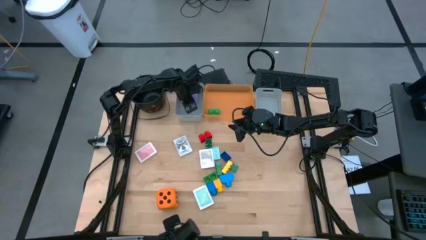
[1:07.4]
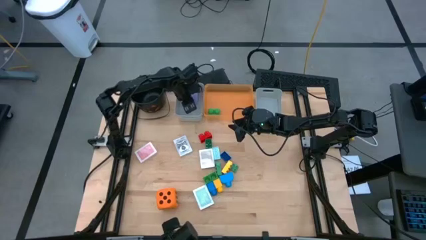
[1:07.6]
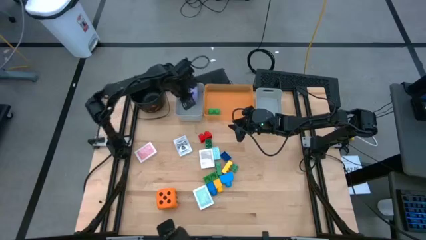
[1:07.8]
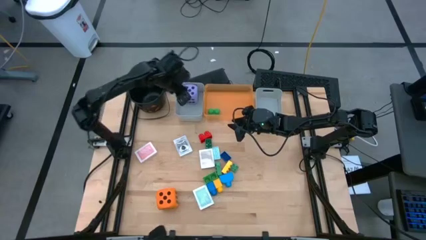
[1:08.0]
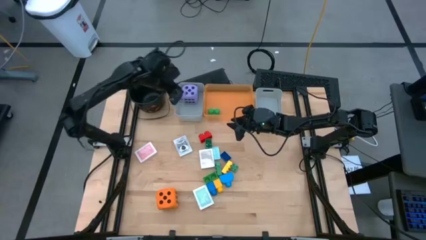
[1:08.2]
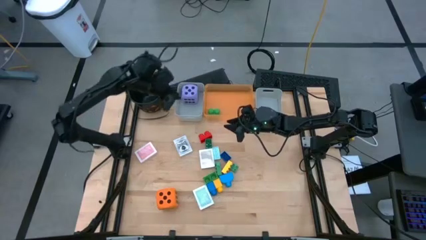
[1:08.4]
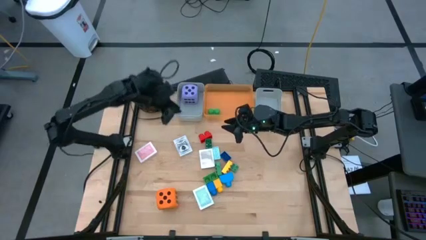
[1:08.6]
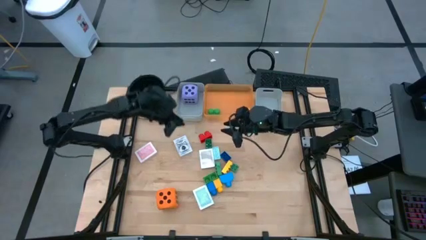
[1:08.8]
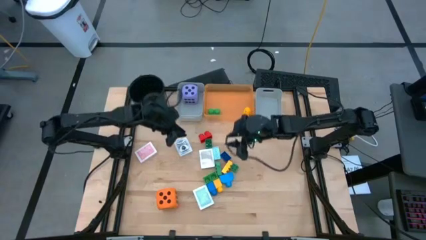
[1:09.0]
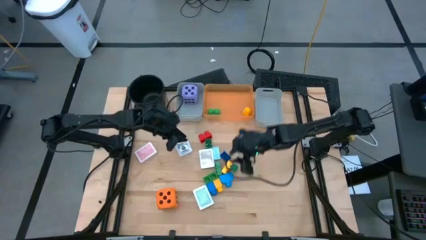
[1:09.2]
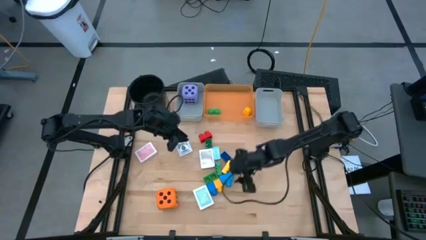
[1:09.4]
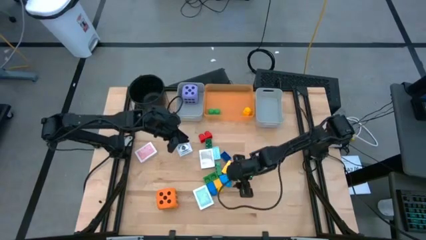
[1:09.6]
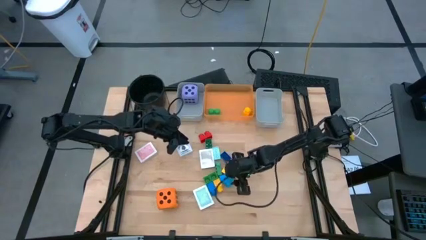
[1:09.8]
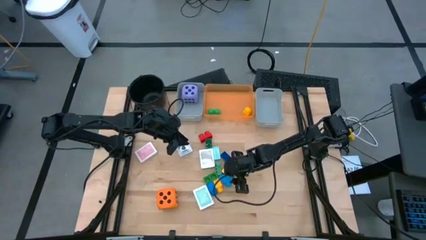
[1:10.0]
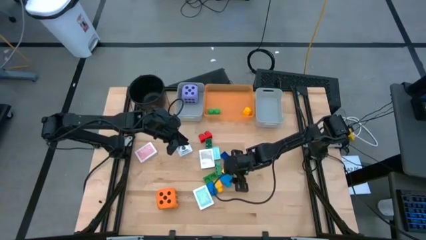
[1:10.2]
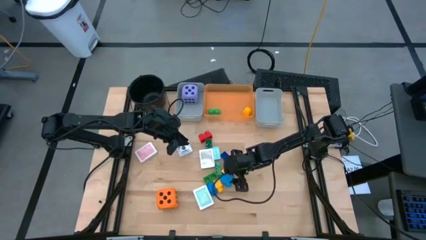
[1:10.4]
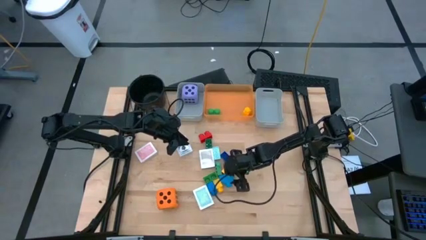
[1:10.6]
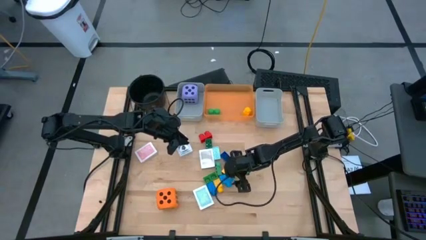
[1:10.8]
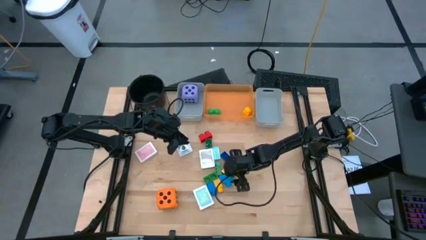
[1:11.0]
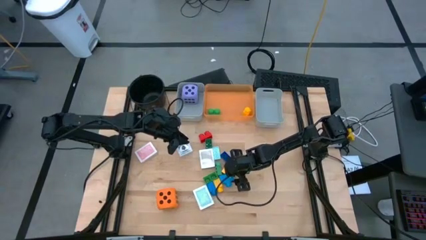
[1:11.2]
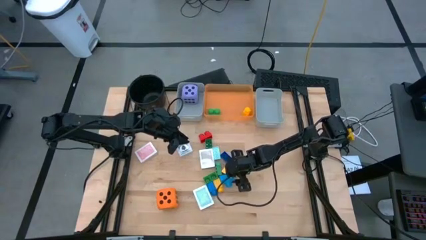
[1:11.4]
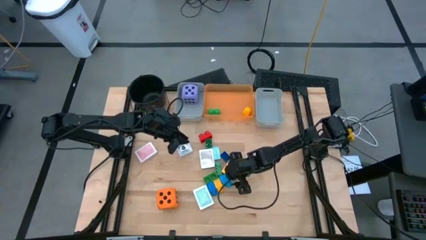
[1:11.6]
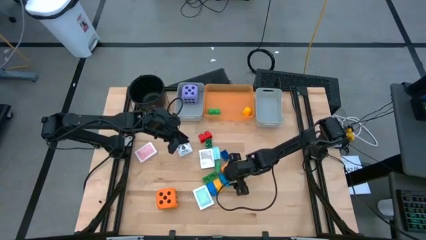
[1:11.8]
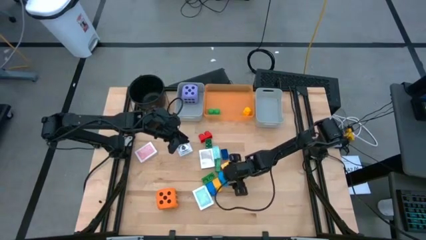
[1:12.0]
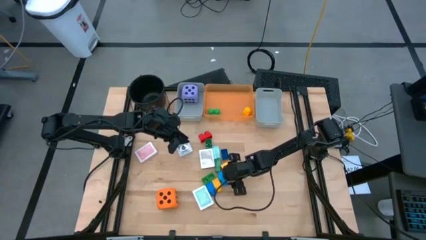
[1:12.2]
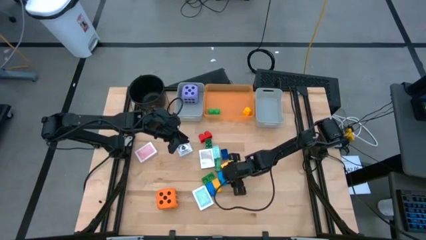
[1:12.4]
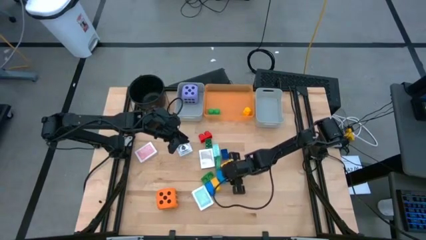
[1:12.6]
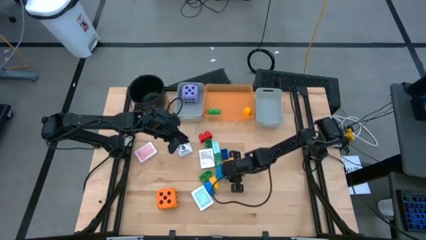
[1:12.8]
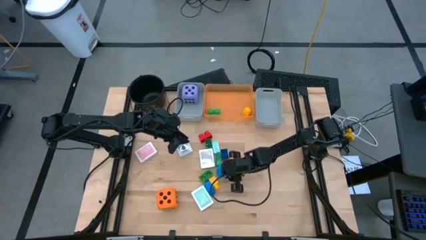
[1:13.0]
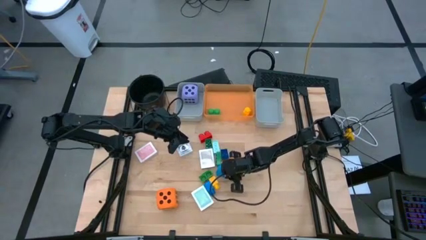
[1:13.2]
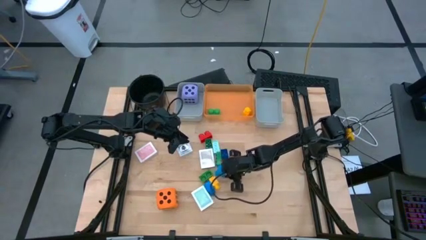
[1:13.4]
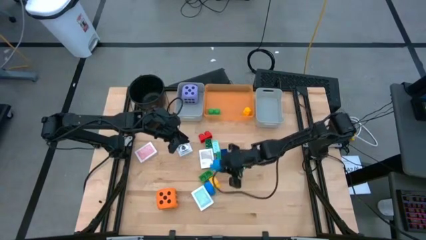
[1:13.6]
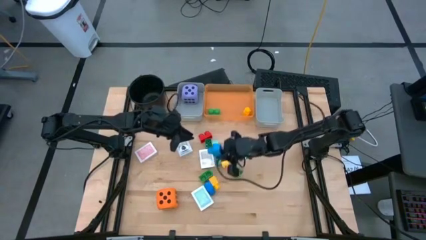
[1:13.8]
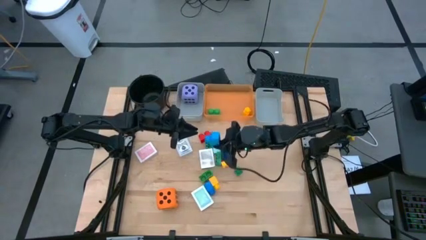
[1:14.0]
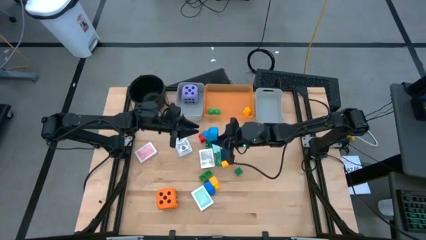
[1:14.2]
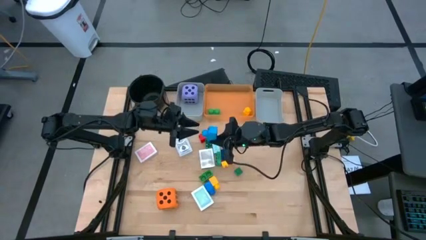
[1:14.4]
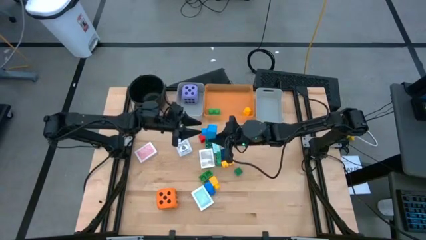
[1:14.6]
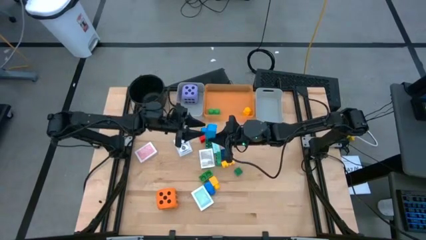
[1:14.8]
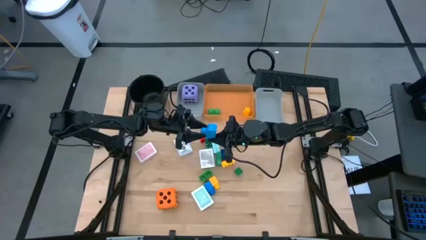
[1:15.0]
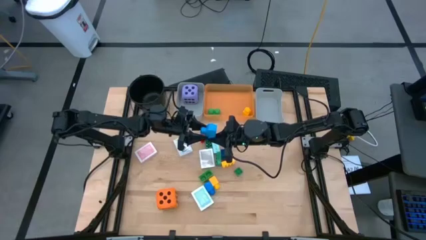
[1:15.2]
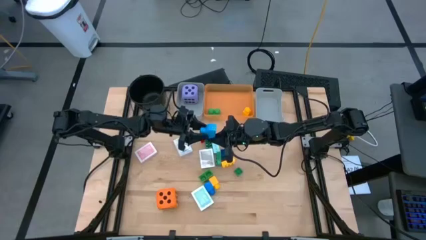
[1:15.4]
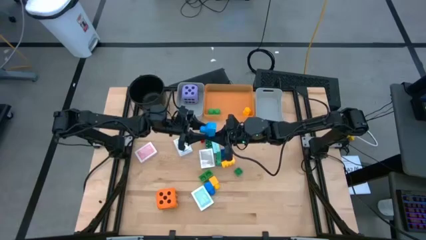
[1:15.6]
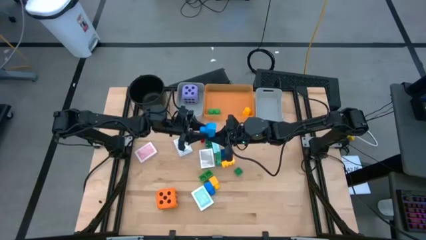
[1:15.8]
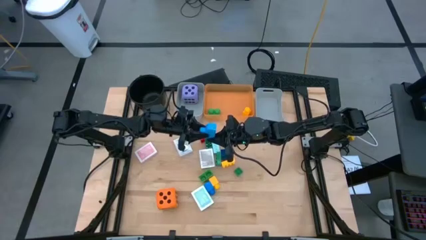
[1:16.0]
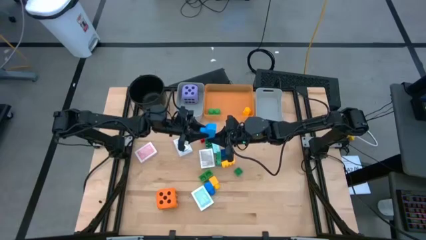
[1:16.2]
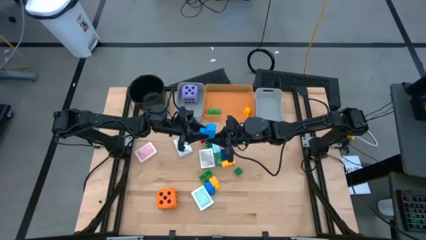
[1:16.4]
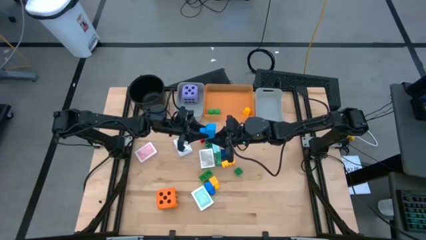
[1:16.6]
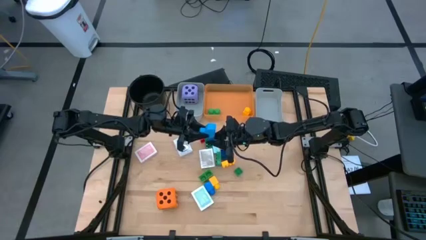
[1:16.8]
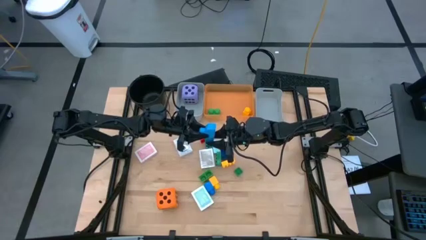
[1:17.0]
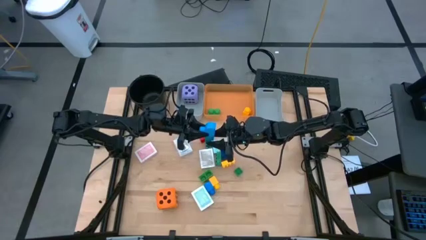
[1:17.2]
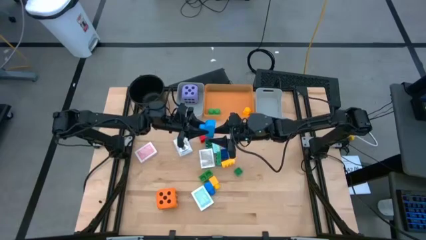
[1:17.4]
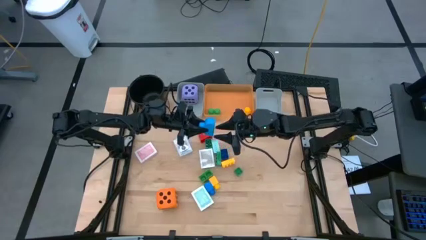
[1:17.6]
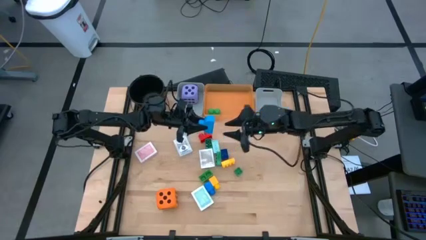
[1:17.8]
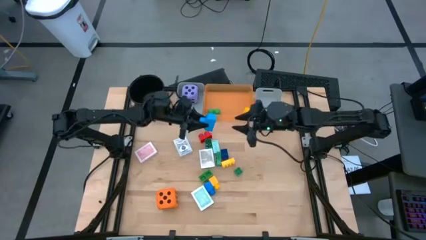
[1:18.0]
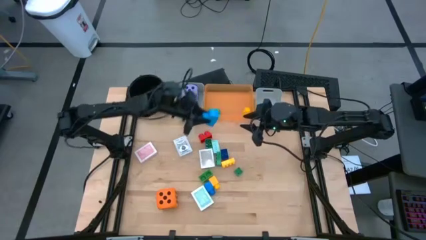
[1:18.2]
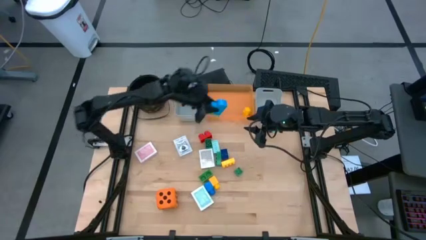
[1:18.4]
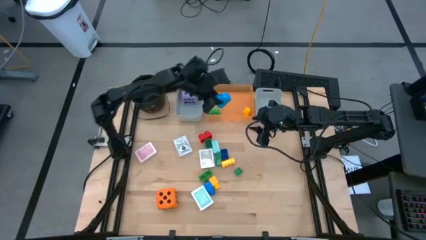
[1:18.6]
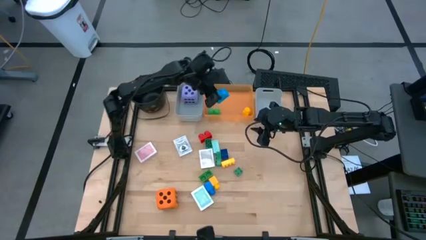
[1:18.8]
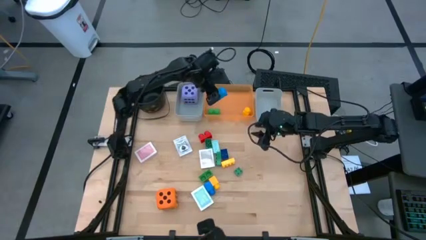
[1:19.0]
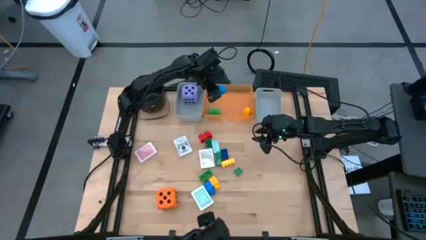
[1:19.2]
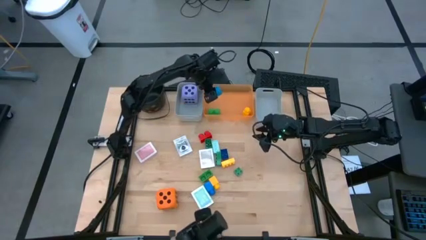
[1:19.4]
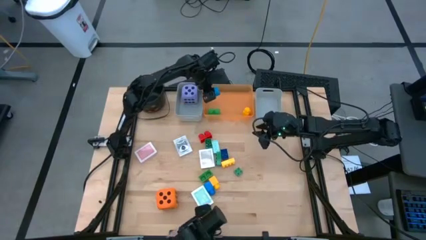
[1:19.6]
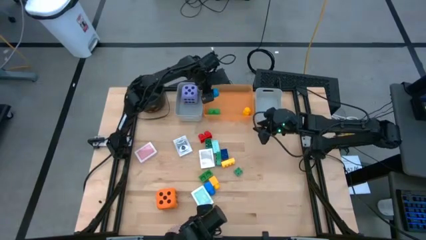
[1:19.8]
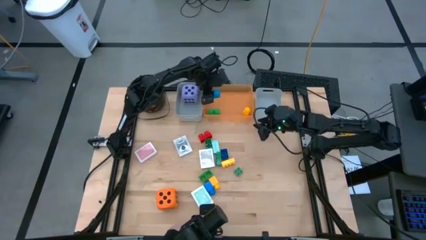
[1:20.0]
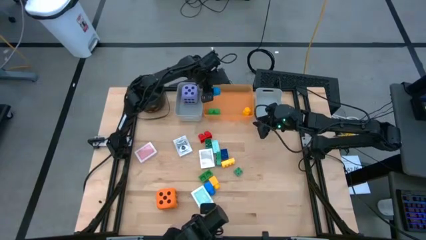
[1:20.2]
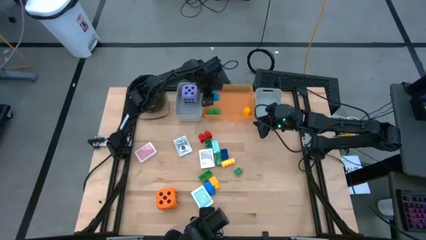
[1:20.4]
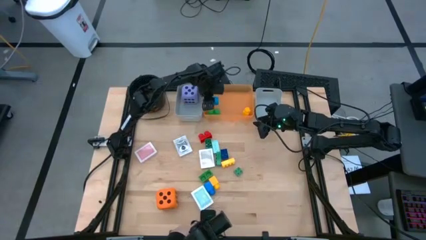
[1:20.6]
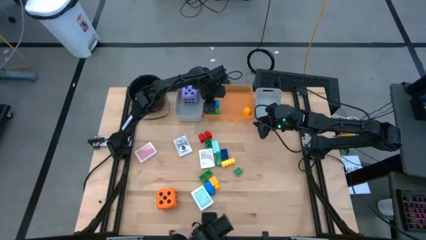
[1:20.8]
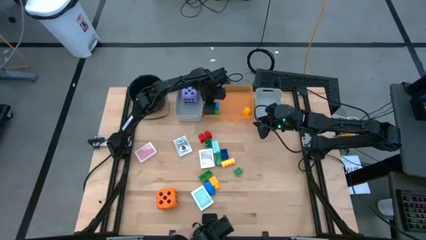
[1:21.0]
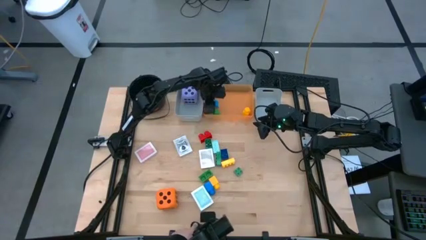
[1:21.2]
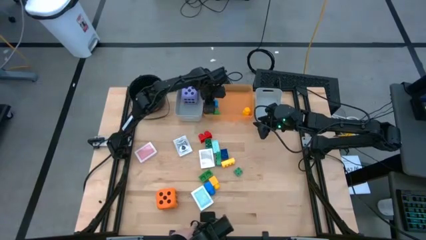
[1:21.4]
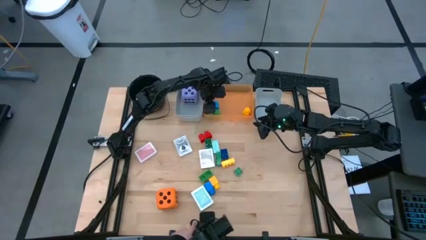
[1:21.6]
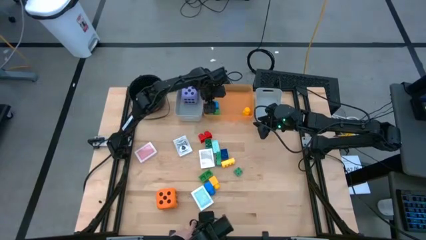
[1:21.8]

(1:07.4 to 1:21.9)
Task: Pick & Place Toys
Put the right blue game piece into the orange bin
